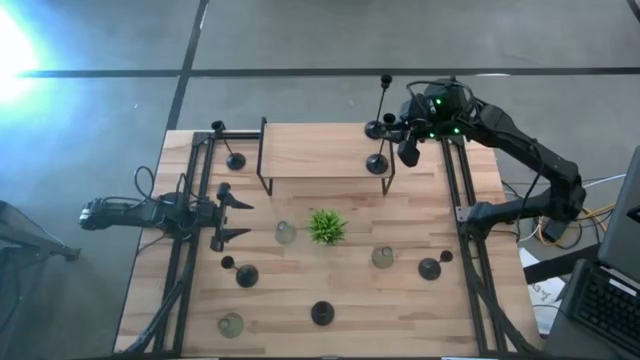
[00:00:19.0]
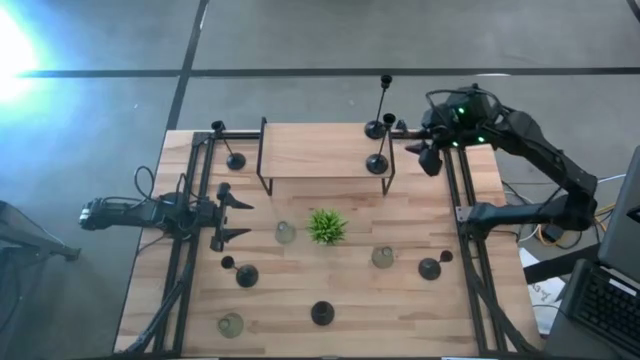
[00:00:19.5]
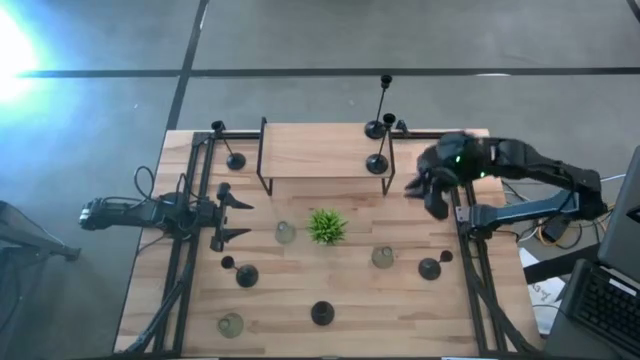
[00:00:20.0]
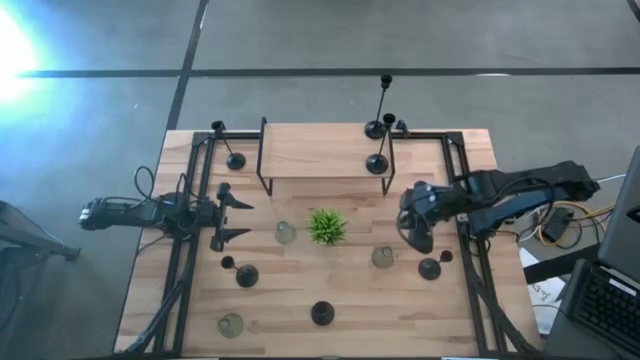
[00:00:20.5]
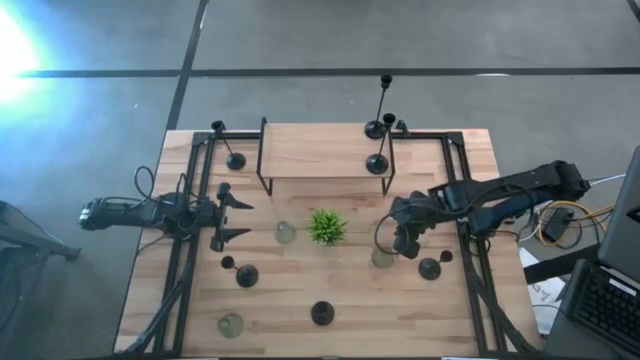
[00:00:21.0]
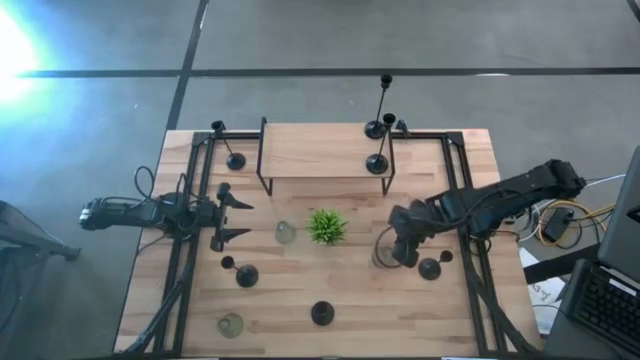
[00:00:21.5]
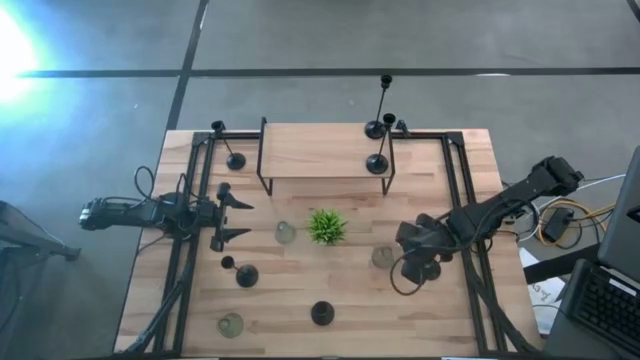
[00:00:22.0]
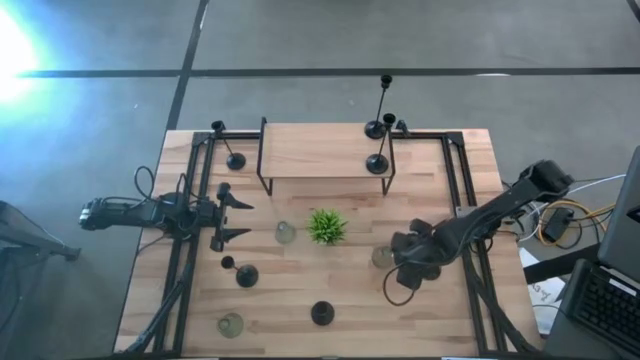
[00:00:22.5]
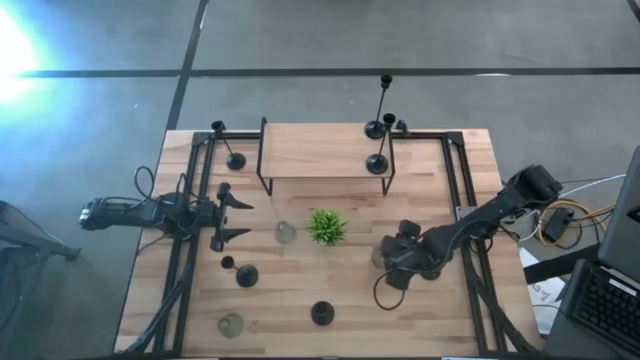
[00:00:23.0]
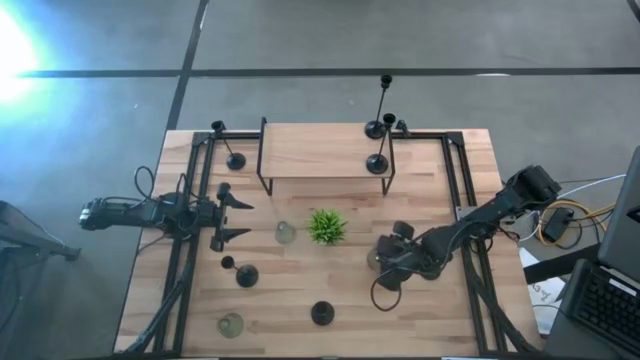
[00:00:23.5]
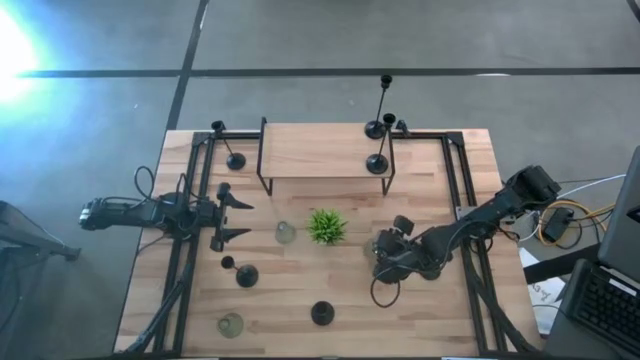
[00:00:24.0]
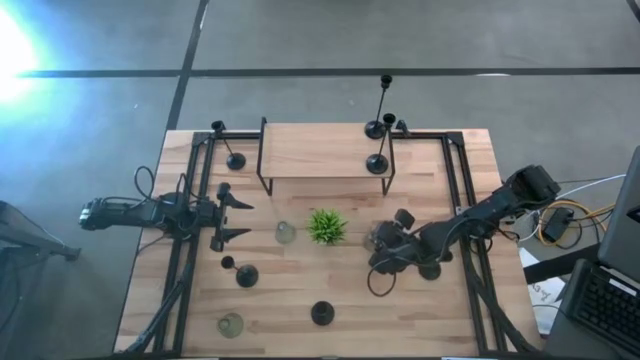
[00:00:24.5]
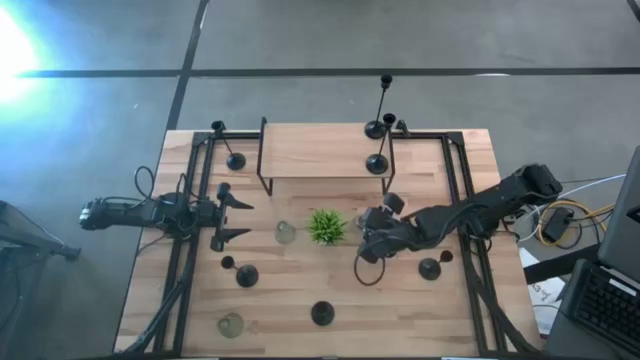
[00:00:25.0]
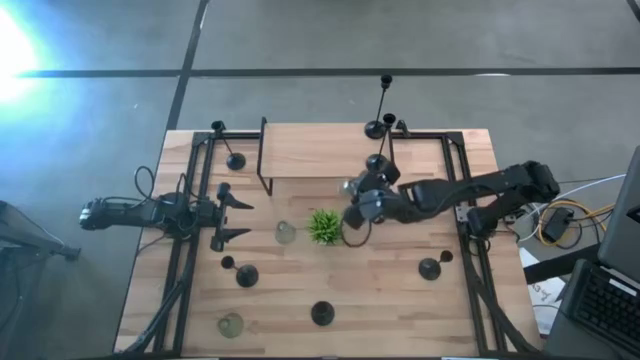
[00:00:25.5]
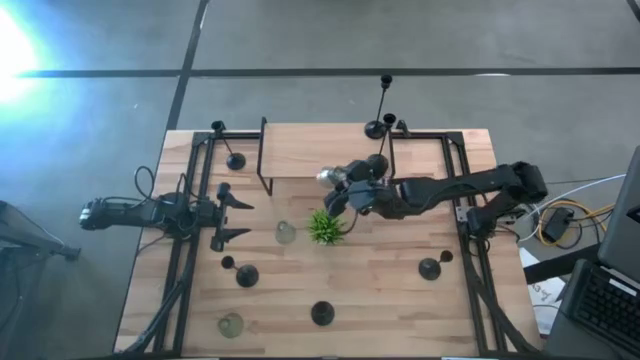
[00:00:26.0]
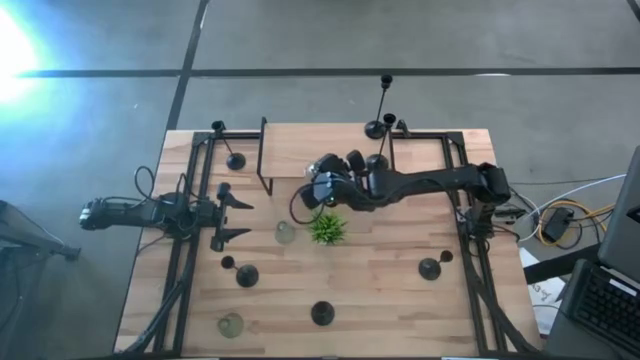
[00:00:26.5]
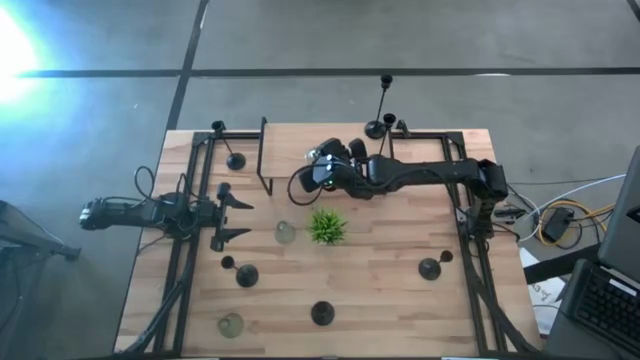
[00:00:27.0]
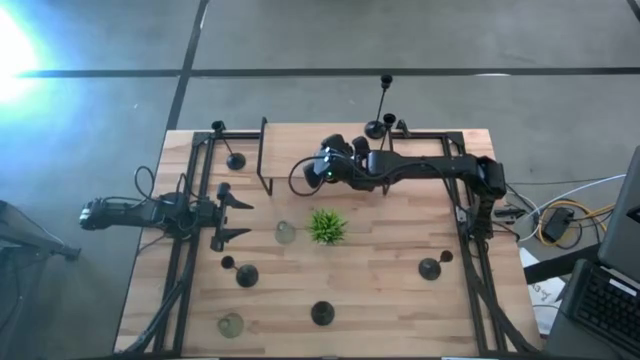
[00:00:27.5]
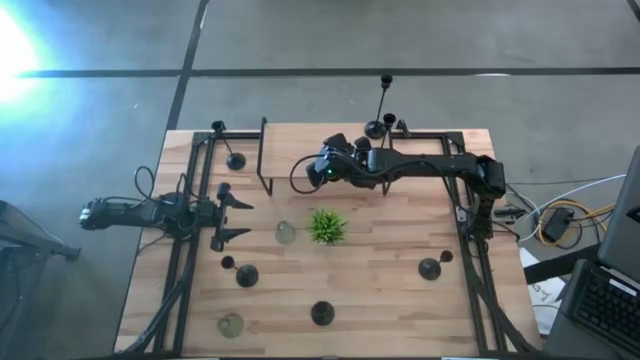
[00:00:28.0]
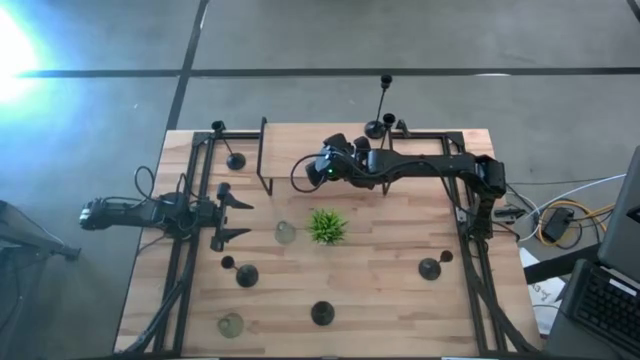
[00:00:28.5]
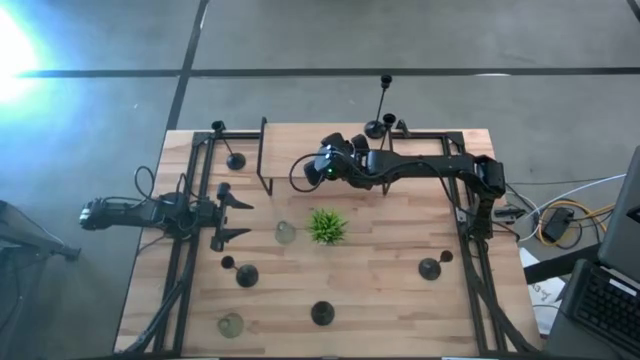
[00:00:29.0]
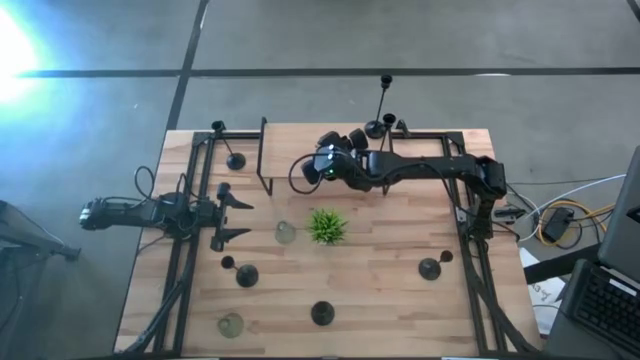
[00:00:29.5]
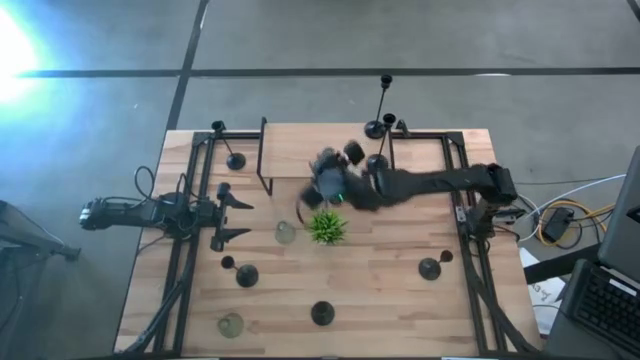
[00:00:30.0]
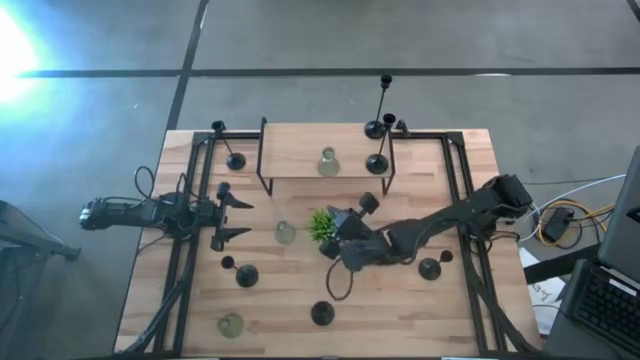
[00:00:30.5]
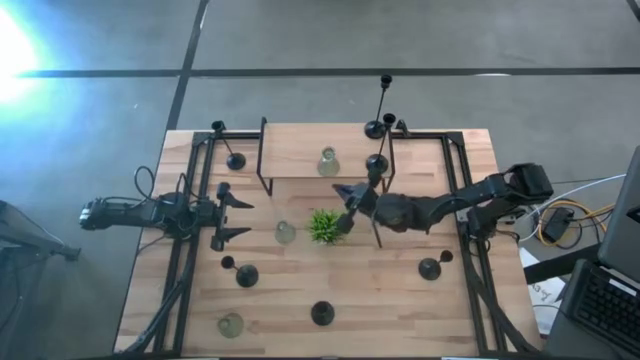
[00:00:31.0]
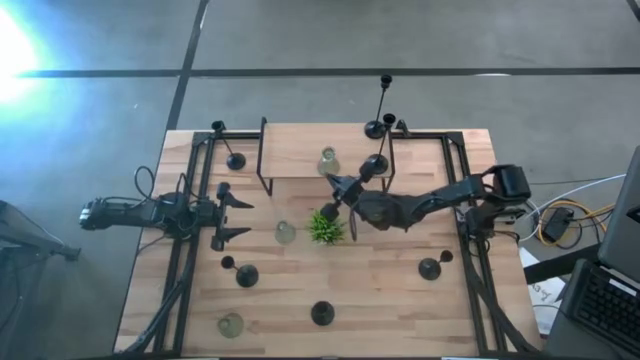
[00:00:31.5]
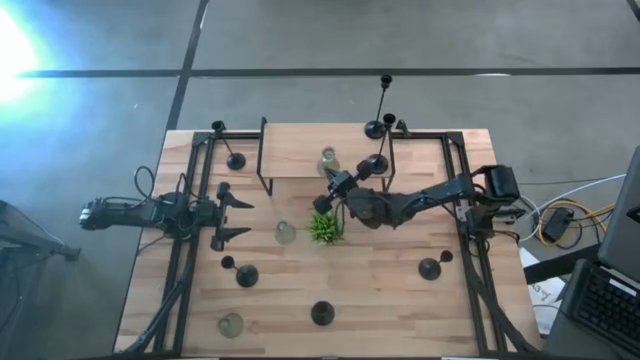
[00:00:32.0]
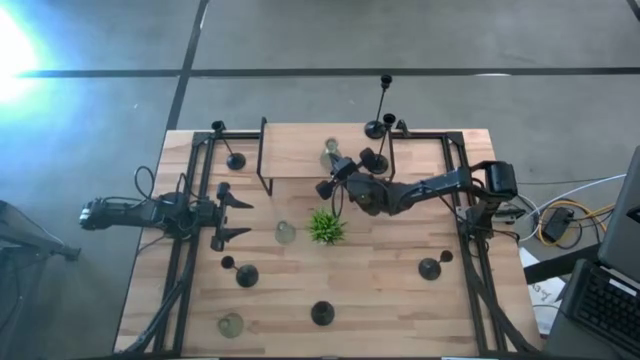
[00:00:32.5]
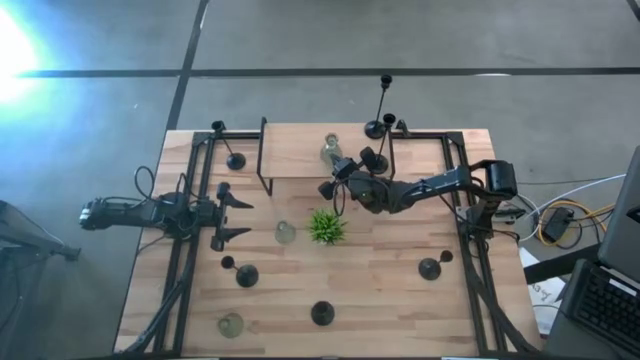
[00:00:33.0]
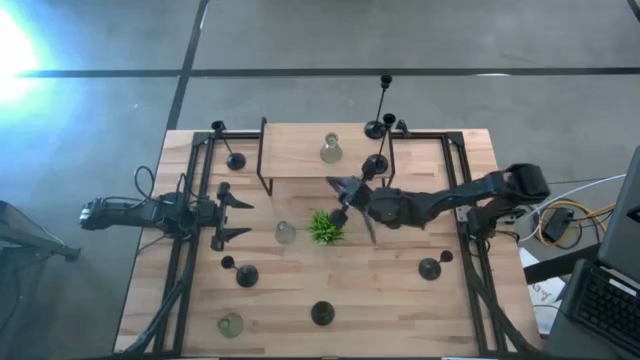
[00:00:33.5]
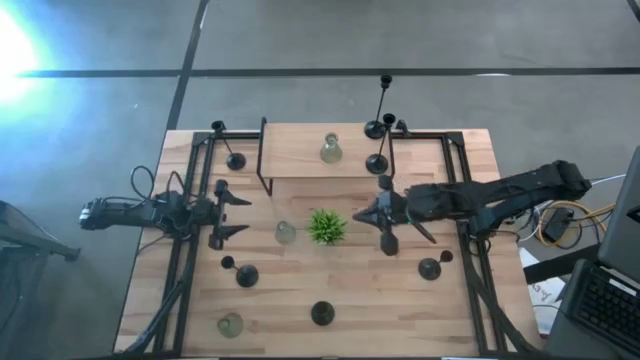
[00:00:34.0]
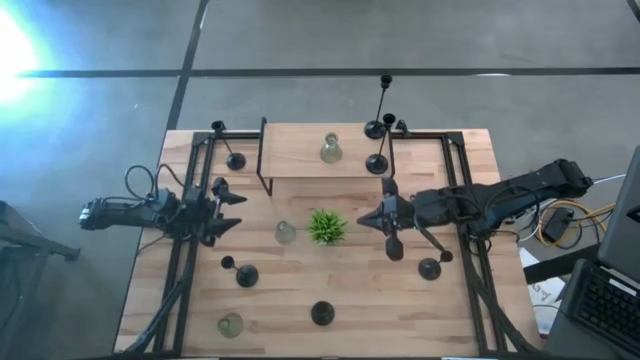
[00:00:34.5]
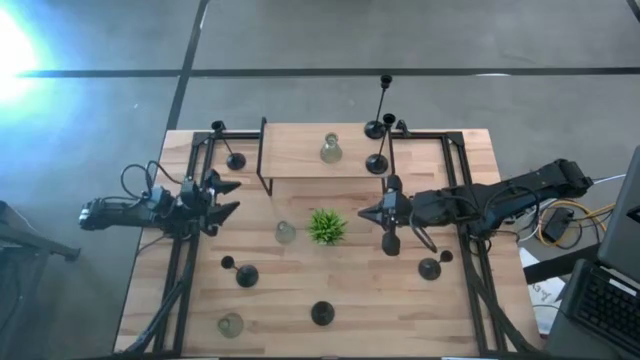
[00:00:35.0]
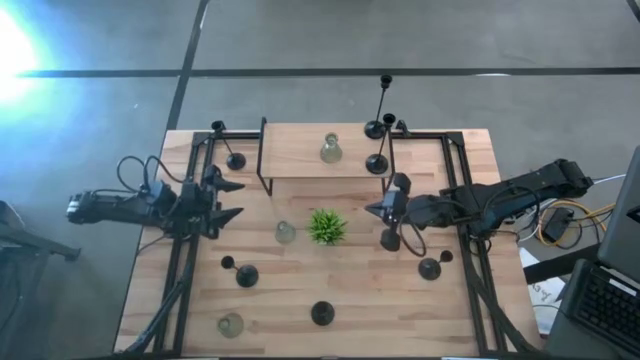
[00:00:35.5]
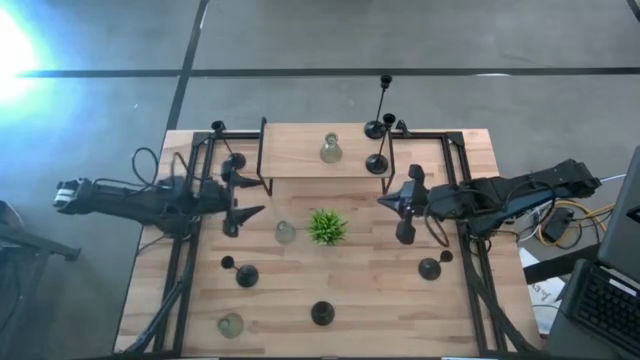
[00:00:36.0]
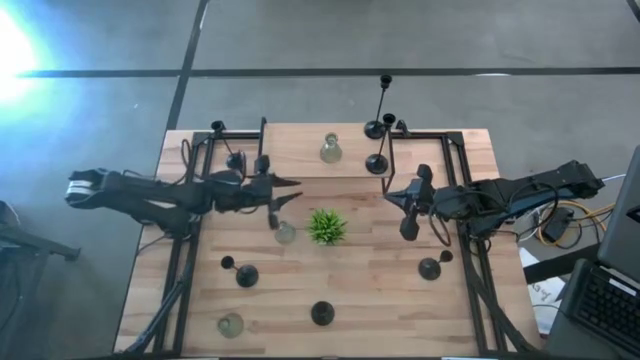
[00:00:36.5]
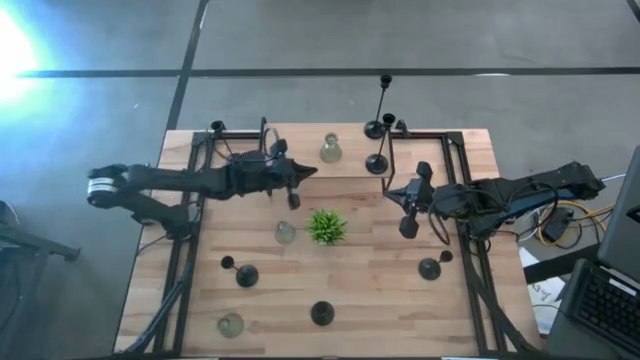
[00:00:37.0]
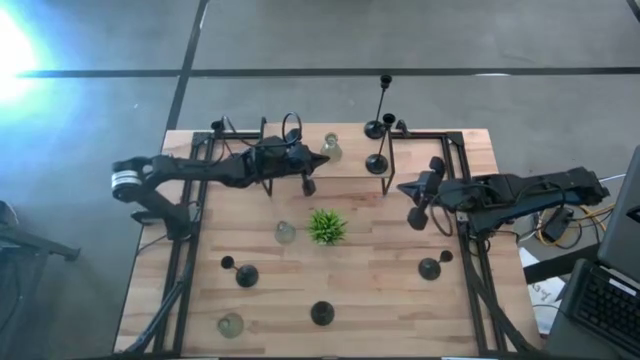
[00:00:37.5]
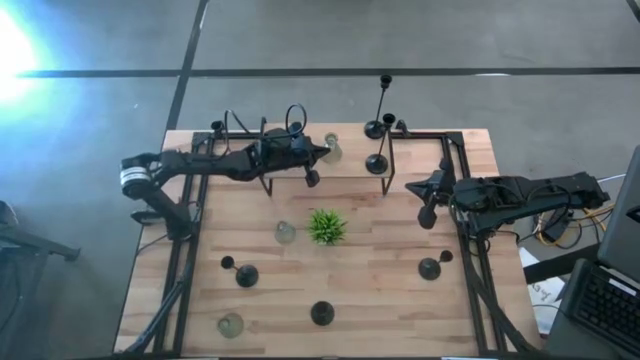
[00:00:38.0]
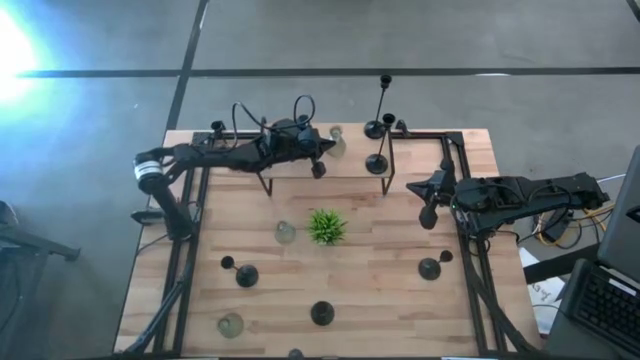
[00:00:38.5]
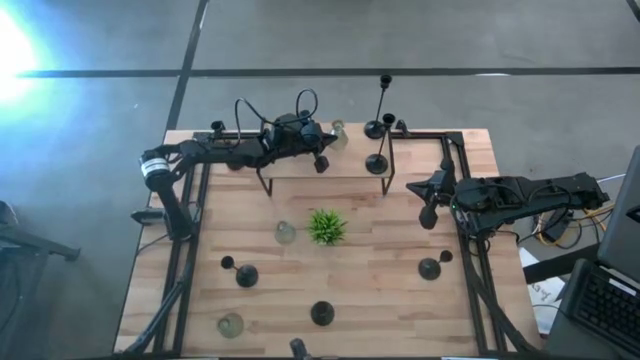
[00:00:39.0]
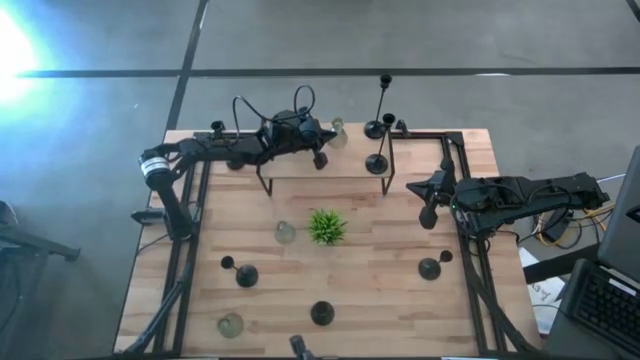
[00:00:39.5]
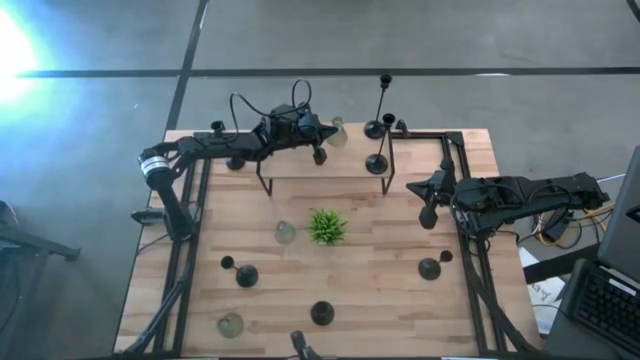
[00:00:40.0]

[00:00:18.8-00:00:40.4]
Task: Pick & Place candle stick holders
Put the right transparent glass candle holder on the shelf
